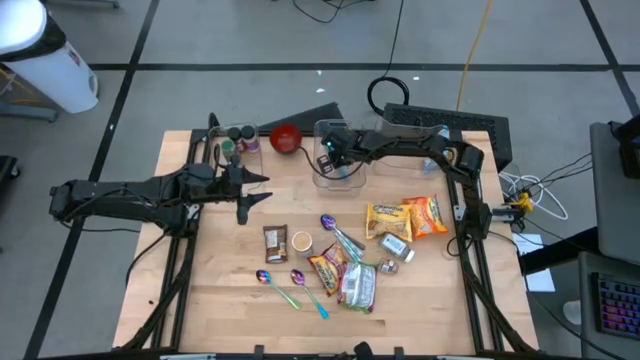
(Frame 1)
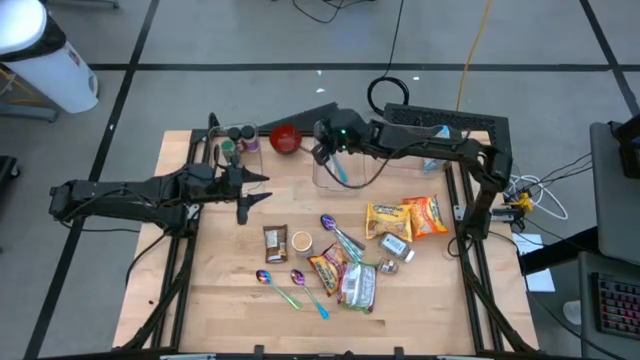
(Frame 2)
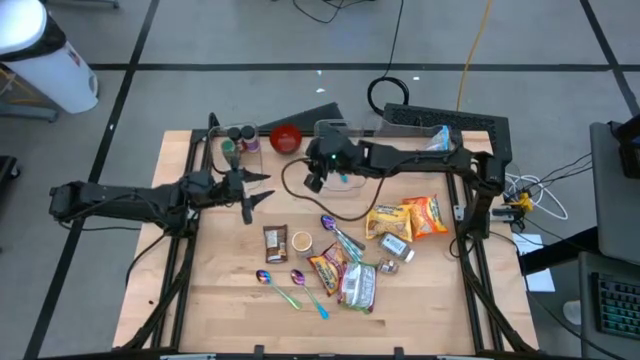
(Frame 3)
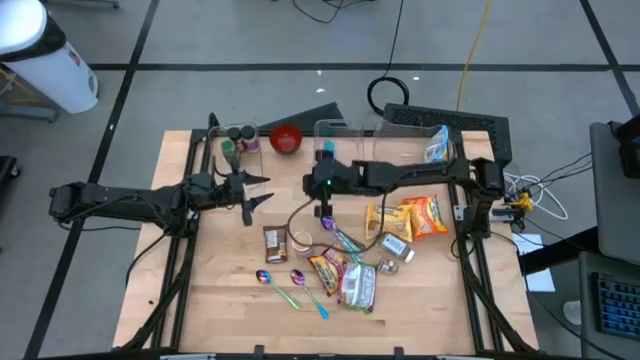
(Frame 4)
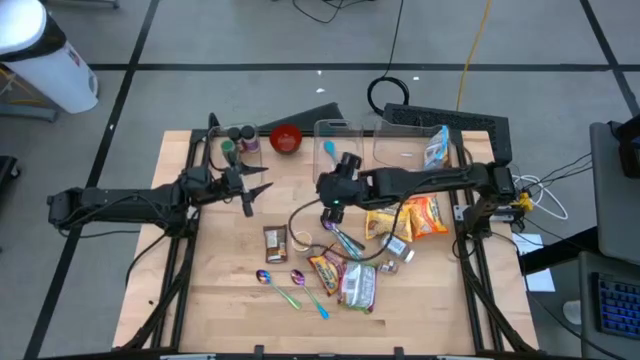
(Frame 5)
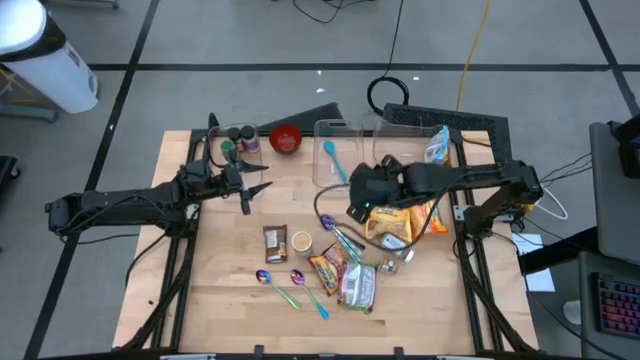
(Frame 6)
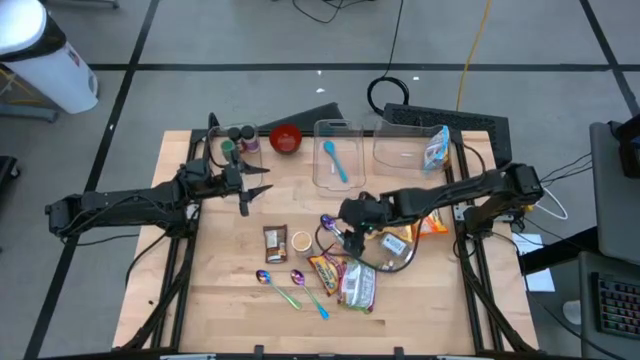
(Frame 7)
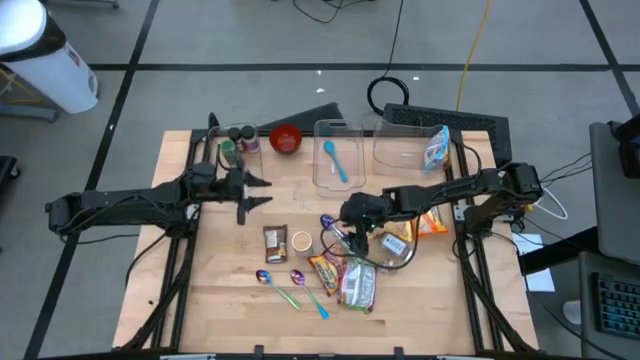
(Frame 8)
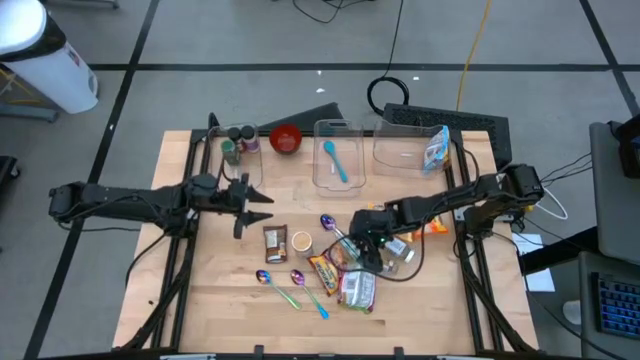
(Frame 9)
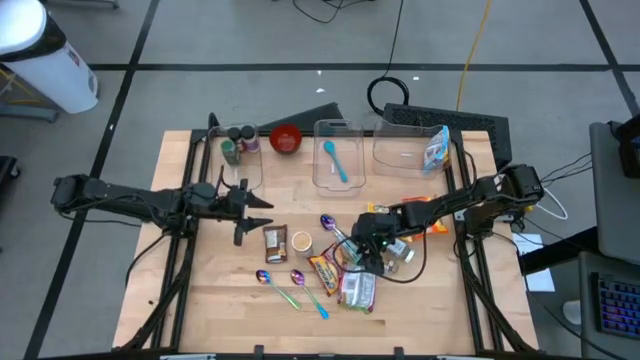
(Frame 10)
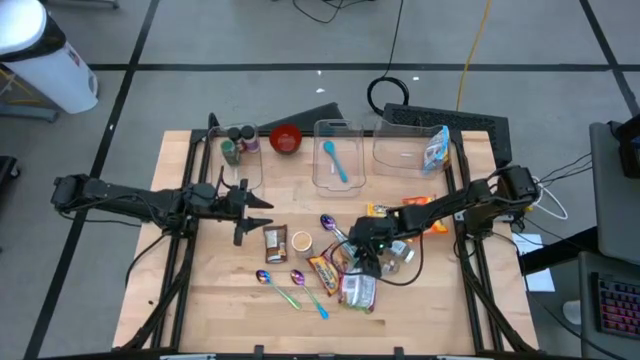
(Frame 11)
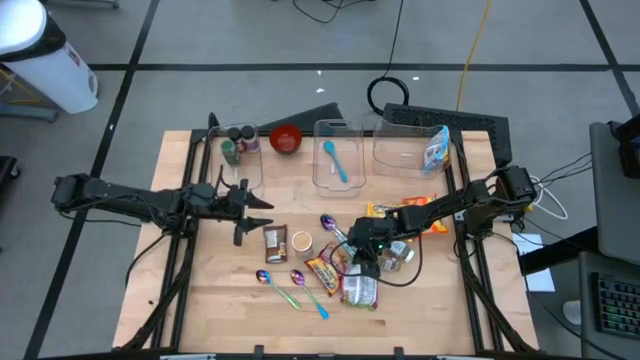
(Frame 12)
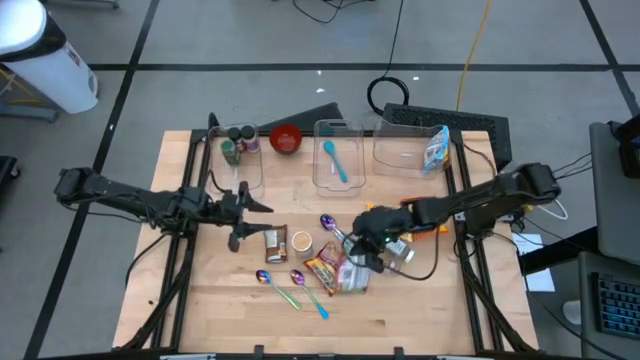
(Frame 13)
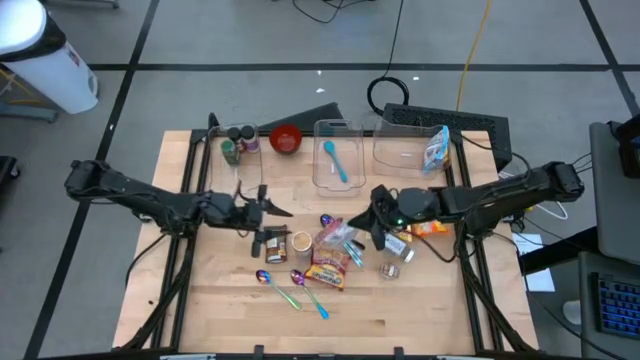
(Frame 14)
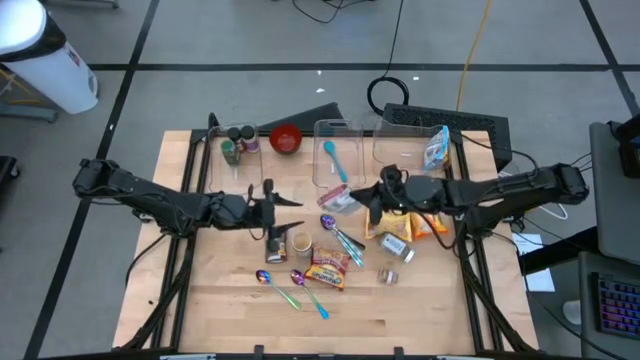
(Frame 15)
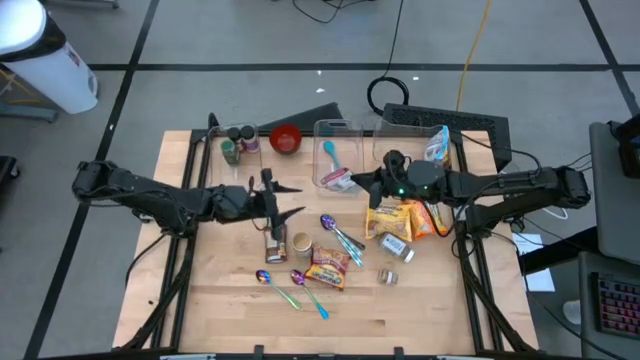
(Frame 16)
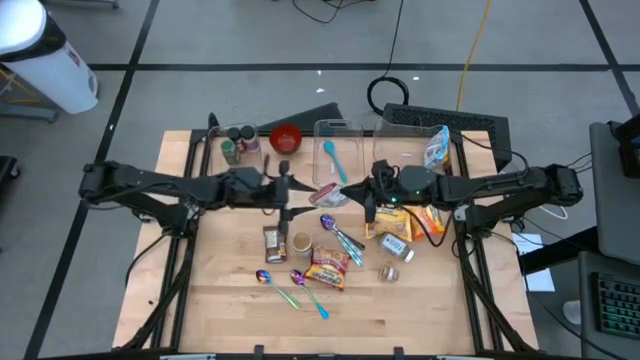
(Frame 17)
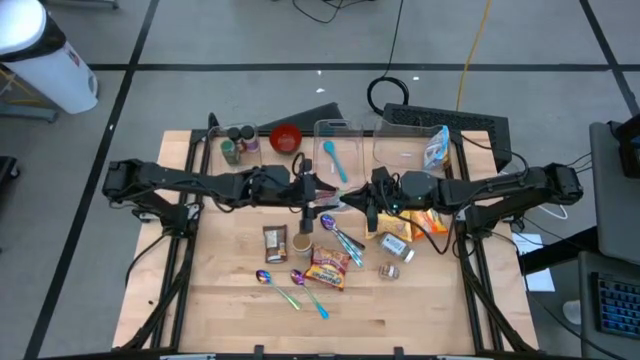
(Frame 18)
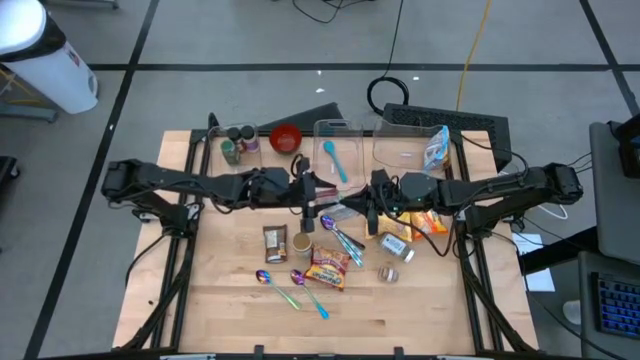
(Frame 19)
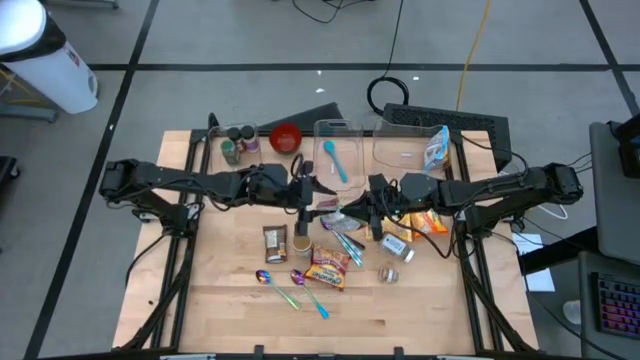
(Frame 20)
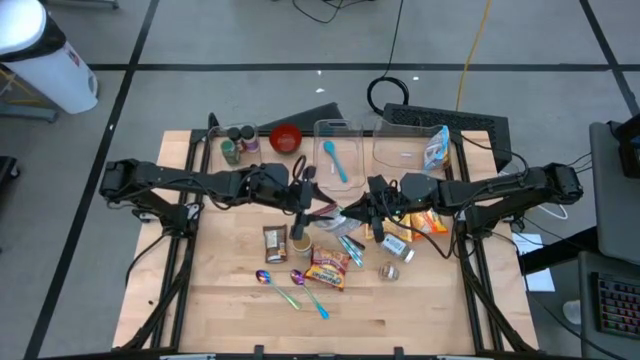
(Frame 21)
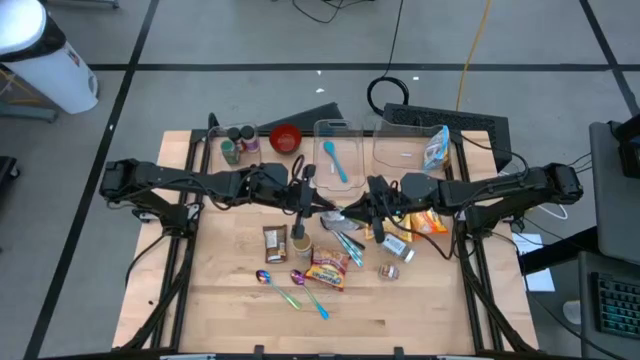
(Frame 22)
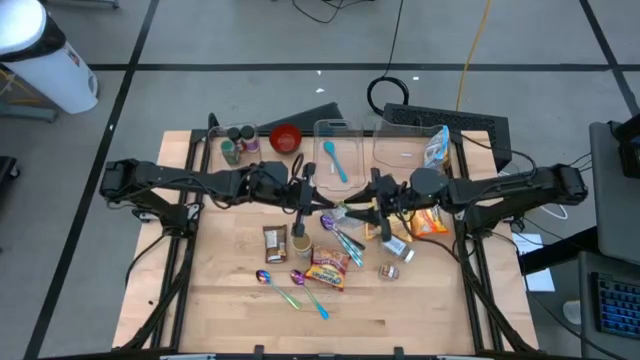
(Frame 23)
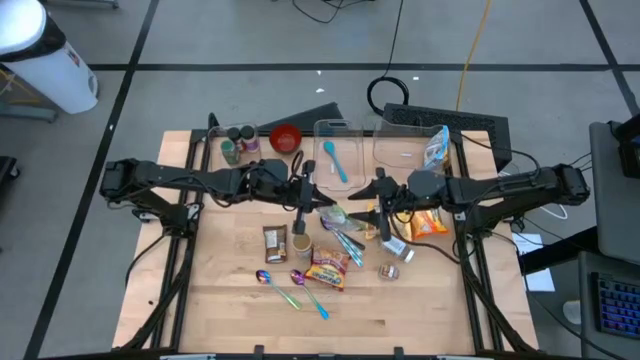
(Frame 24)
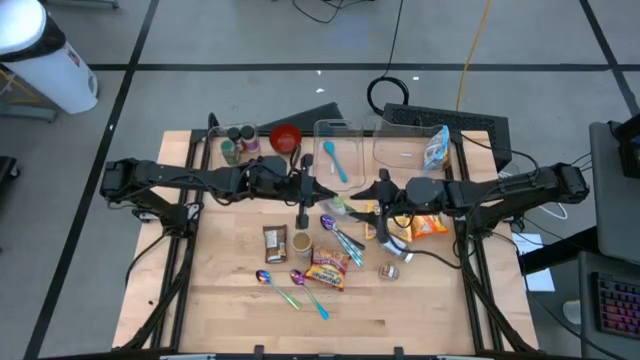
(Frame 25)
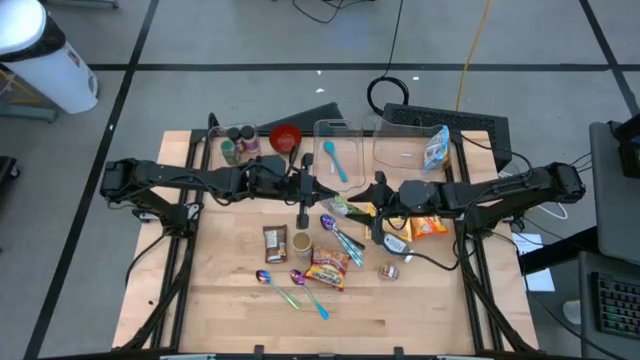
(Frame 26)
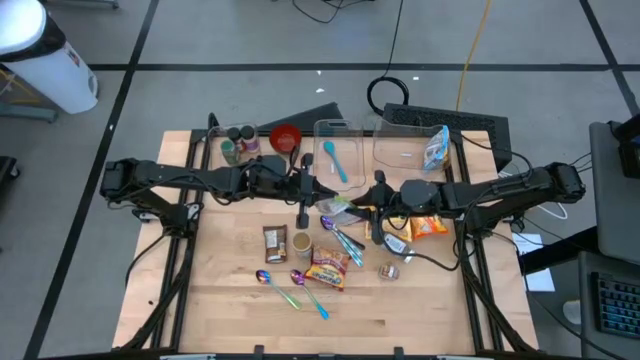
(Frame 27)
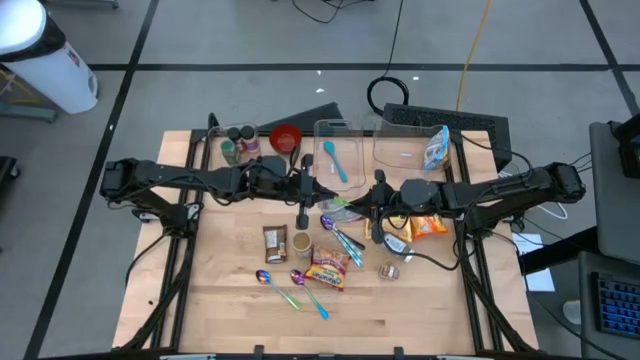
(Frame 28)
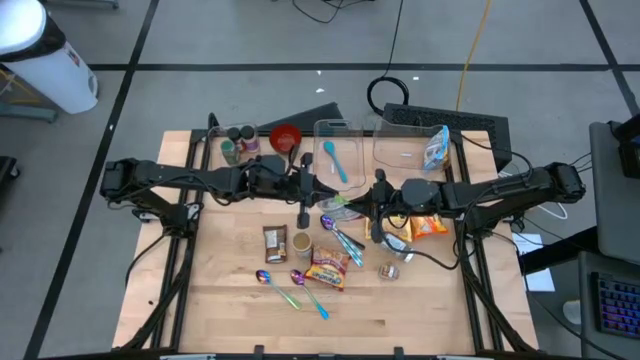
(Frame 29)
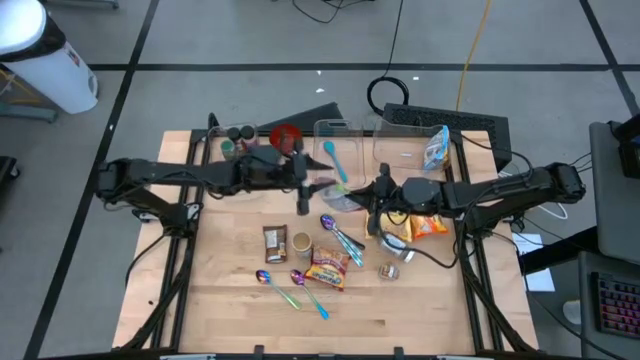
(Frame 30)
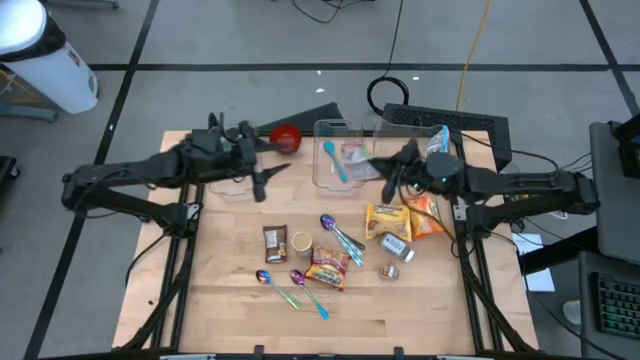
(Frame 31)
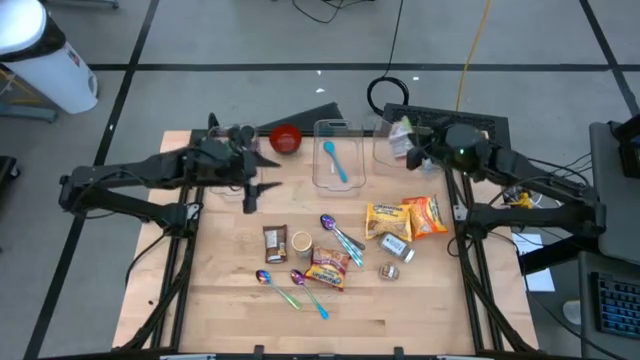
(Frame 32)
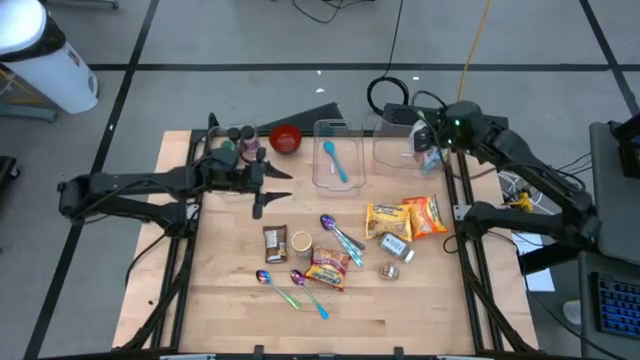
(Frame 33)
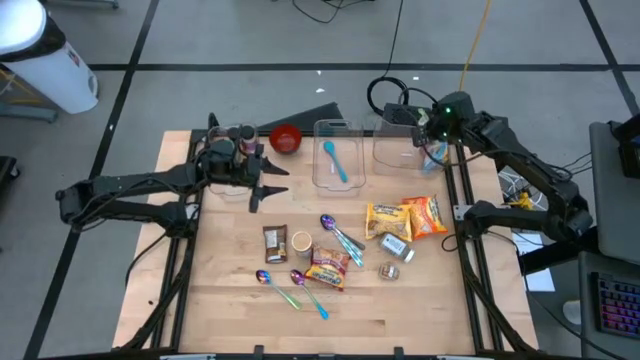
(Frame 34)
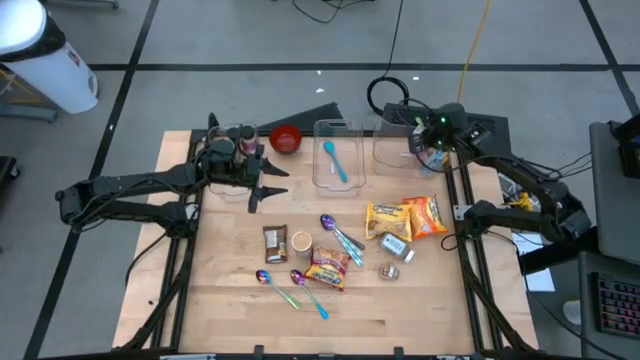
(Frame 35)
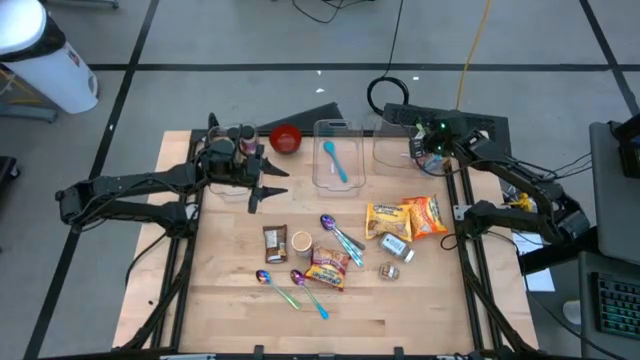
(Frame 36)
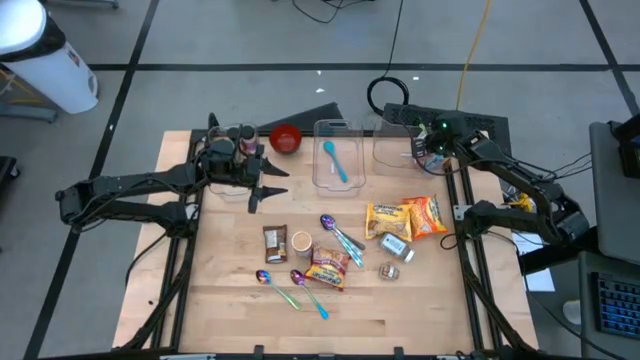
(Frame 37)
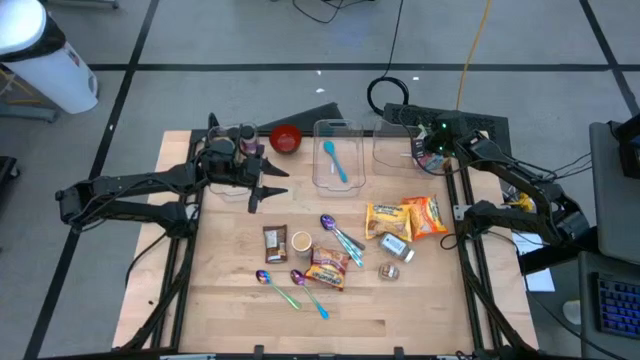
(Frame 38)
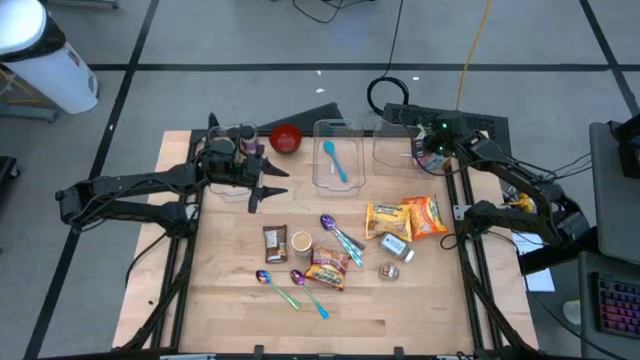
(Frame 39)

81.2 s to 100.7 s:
Task: Pick & Place Food Item
Put the yellow and green noodle pack into the right transparent bin

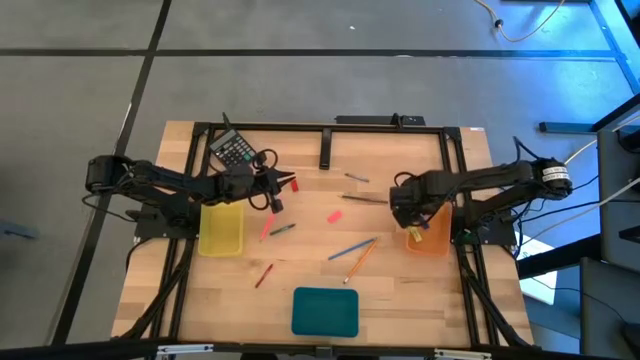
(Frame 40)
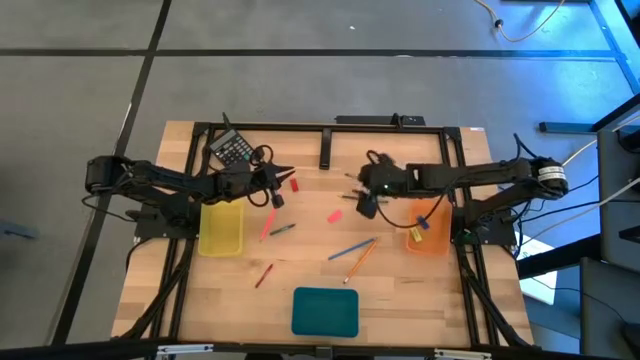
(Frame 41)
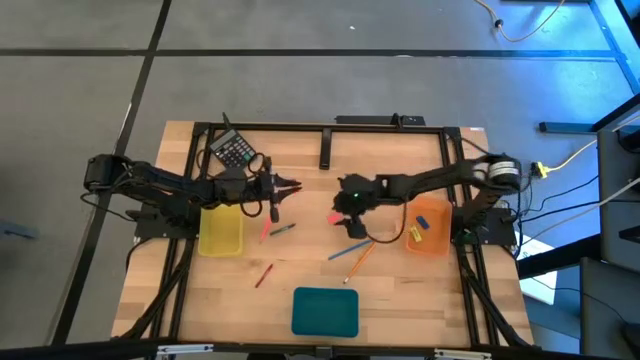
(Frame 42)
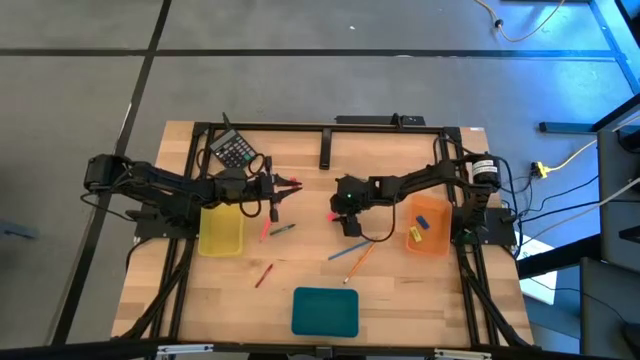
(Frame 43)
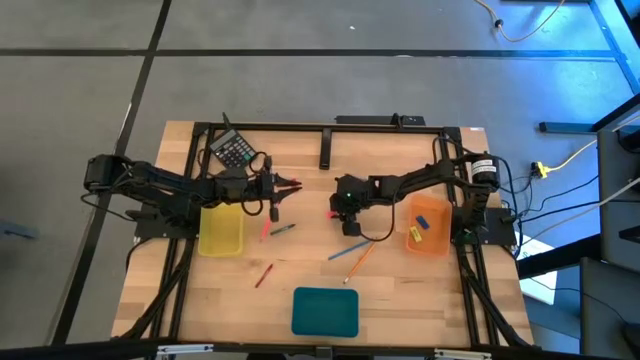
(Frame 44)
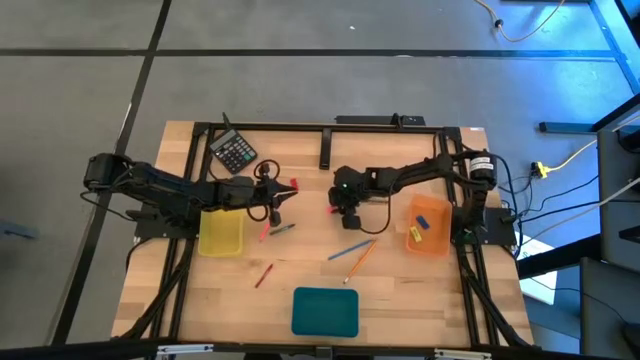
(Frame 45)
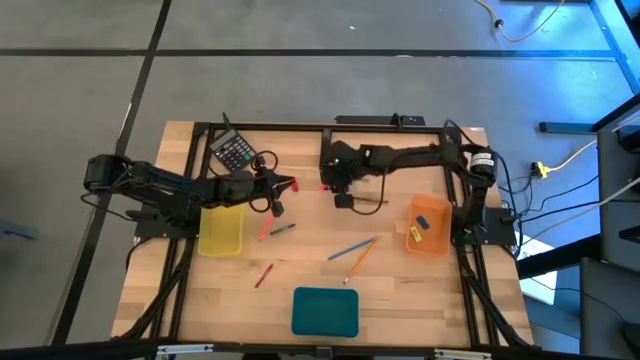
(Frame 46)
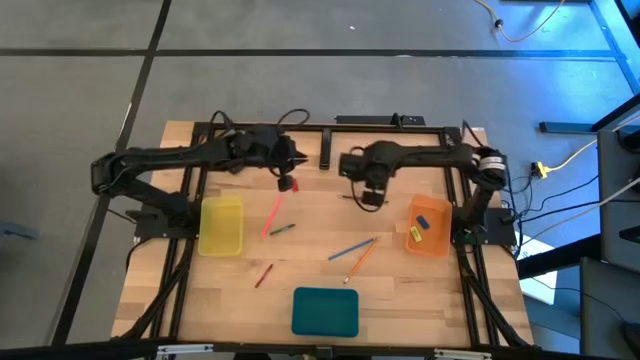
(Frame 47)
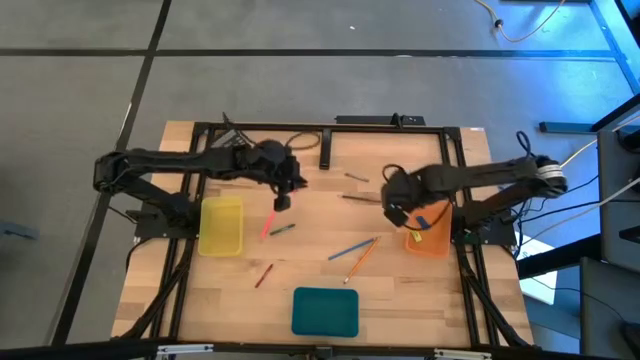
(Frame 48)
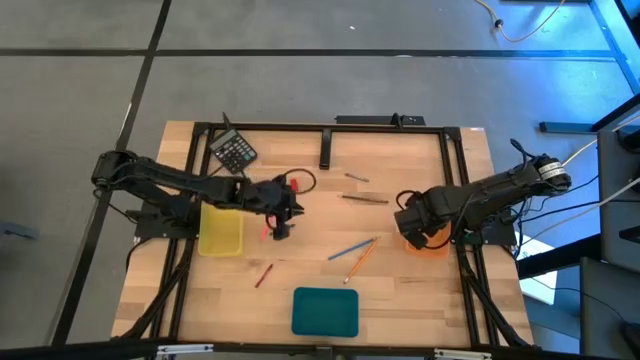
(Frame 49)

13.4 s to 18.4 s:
Task: Sort crayons/erasers/pens/pencils in bins
Put the pink eraser into the orange bin
